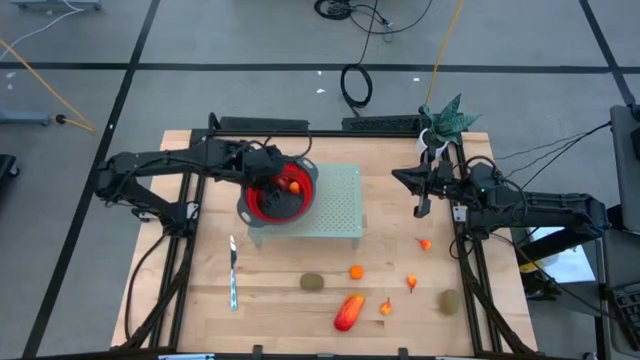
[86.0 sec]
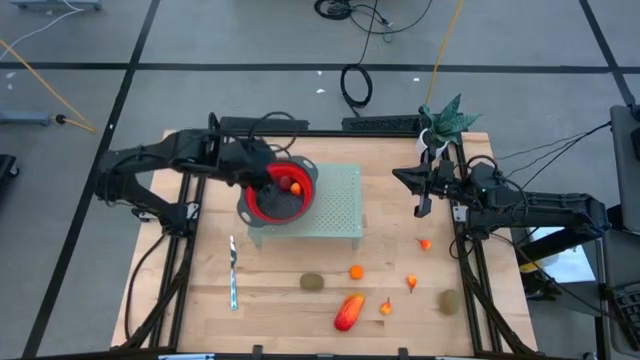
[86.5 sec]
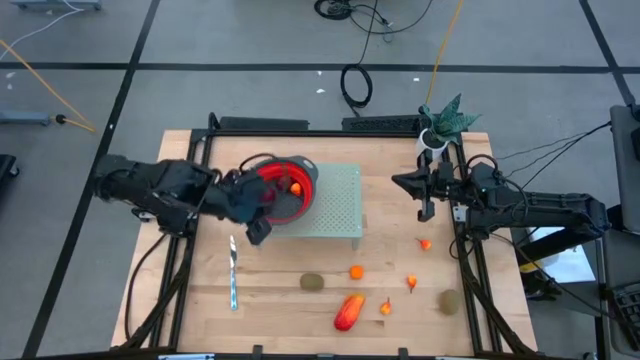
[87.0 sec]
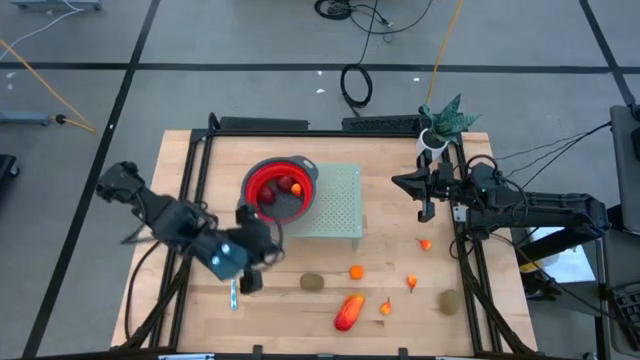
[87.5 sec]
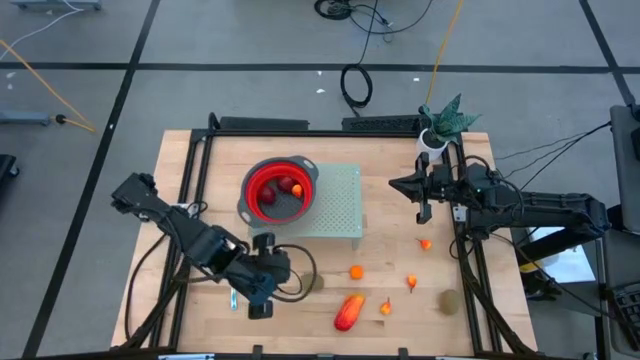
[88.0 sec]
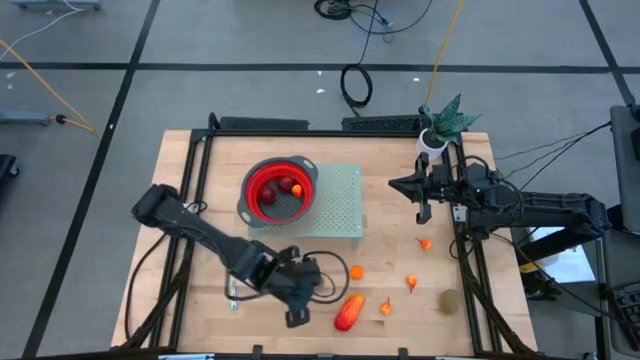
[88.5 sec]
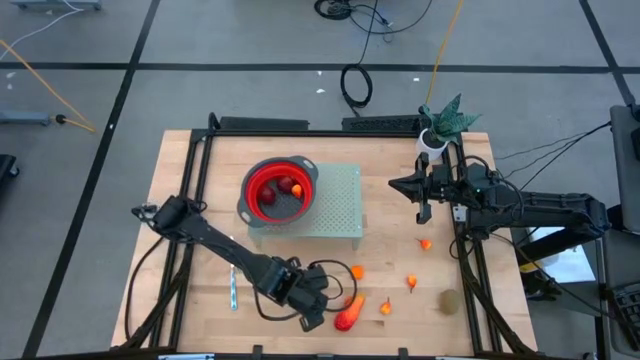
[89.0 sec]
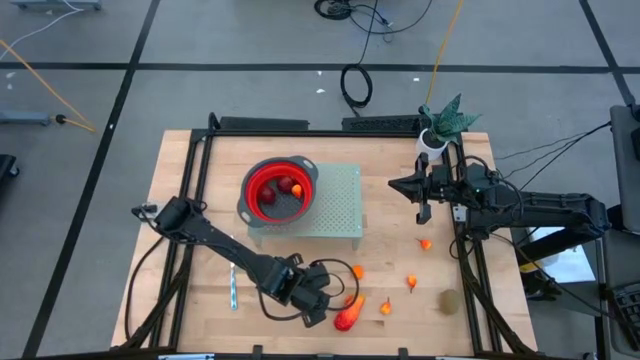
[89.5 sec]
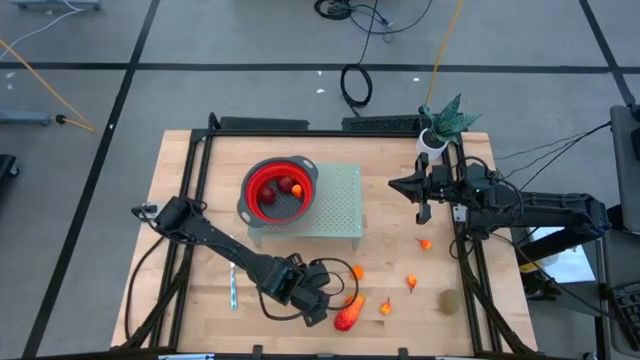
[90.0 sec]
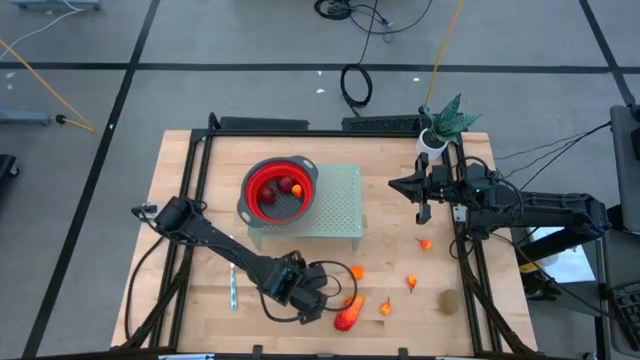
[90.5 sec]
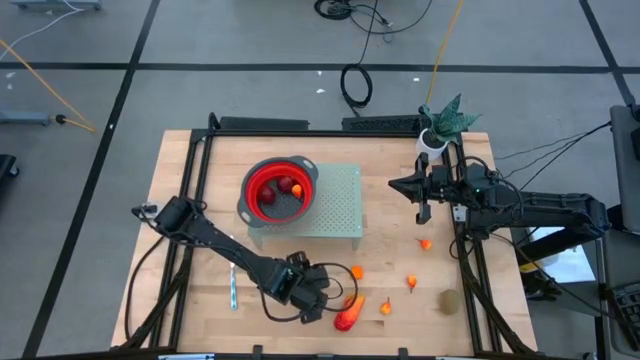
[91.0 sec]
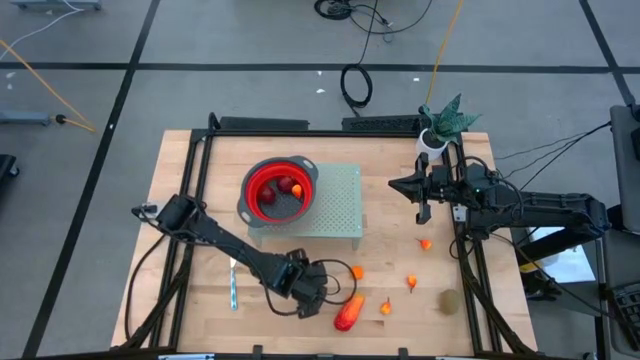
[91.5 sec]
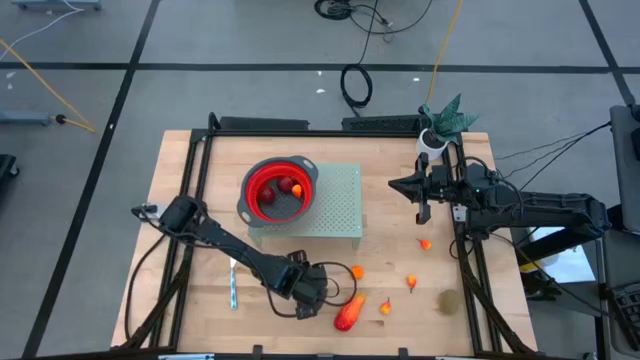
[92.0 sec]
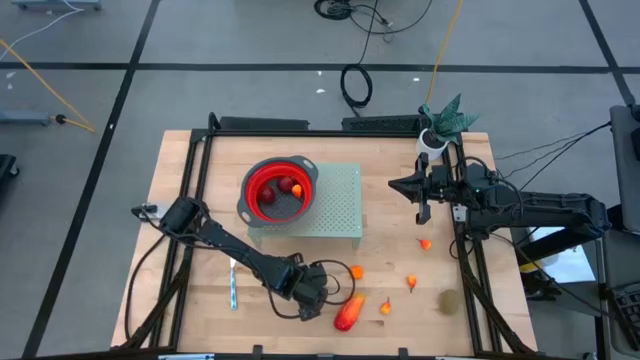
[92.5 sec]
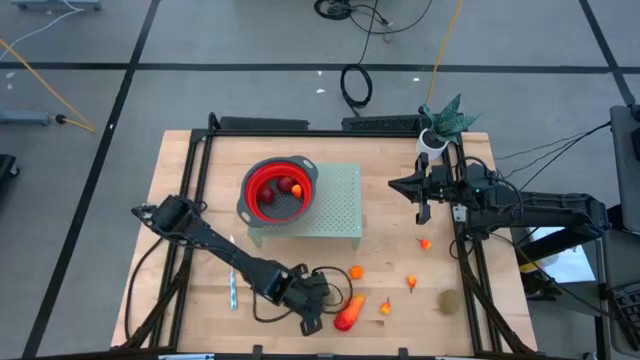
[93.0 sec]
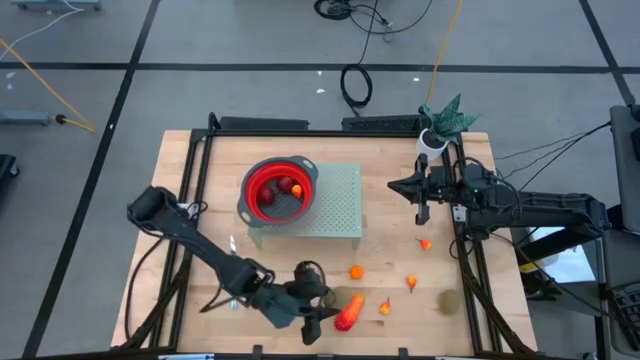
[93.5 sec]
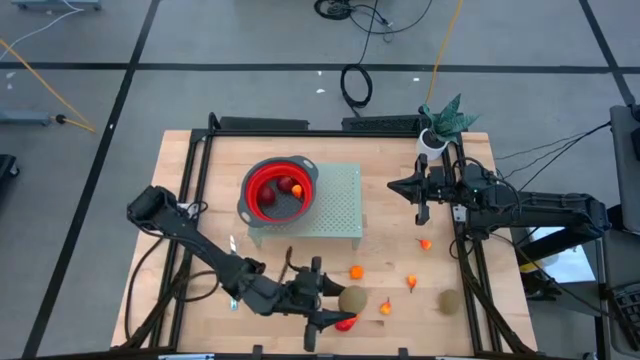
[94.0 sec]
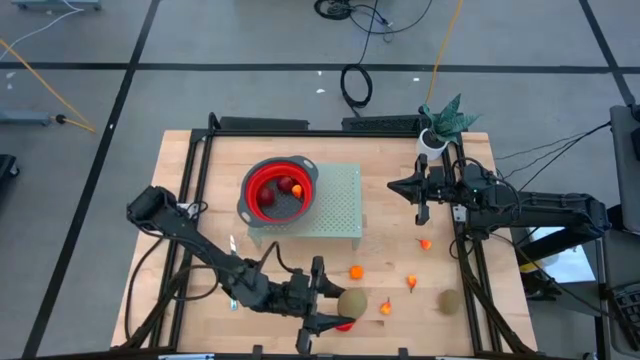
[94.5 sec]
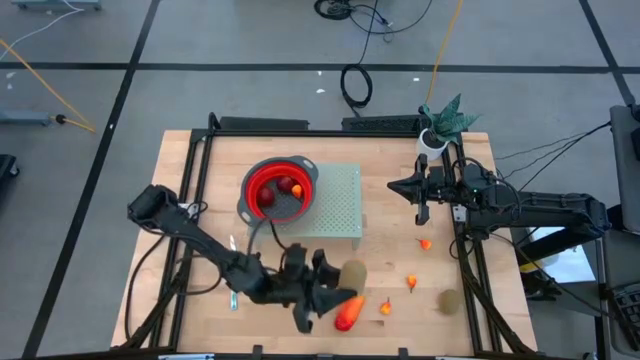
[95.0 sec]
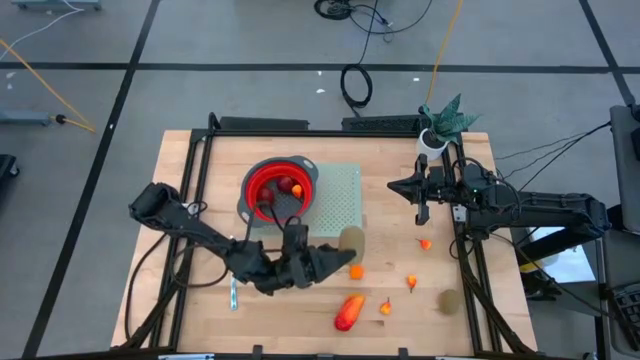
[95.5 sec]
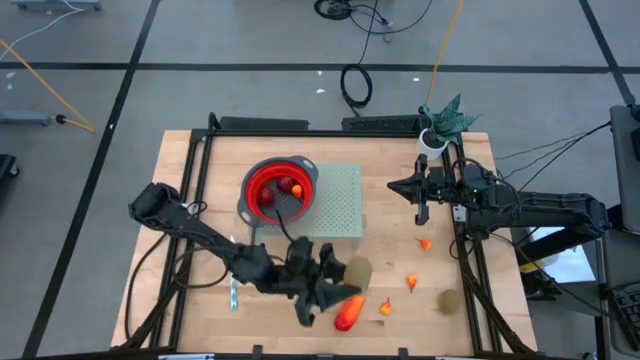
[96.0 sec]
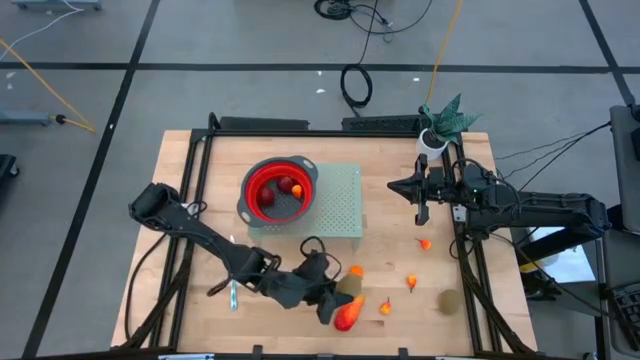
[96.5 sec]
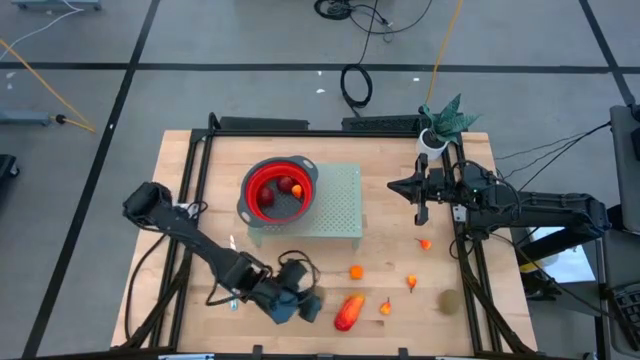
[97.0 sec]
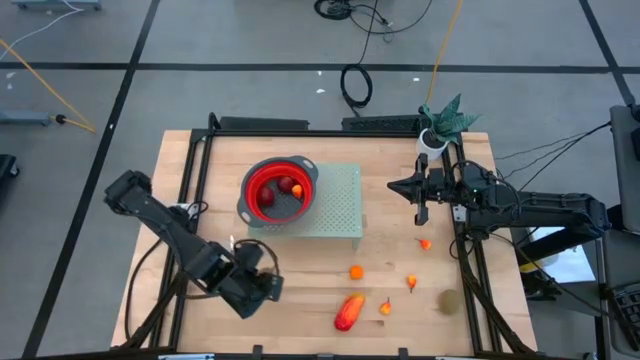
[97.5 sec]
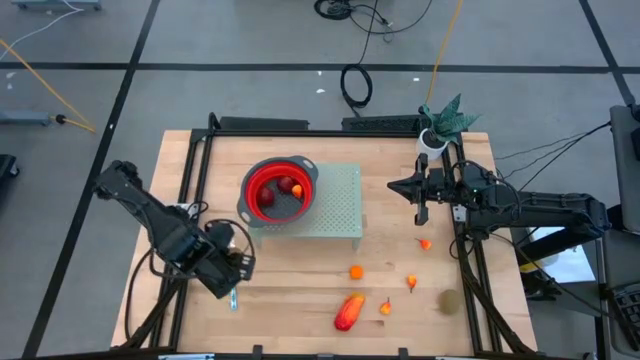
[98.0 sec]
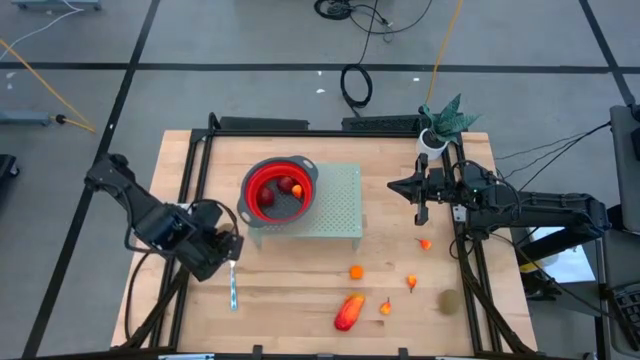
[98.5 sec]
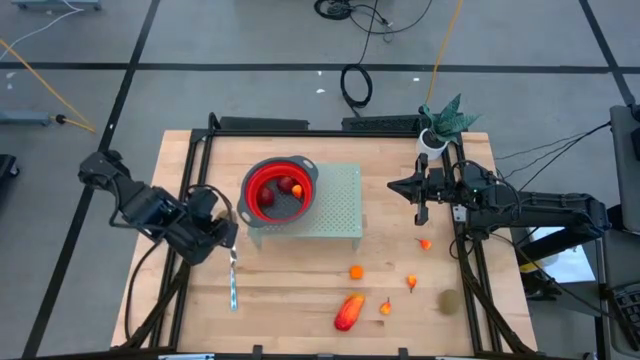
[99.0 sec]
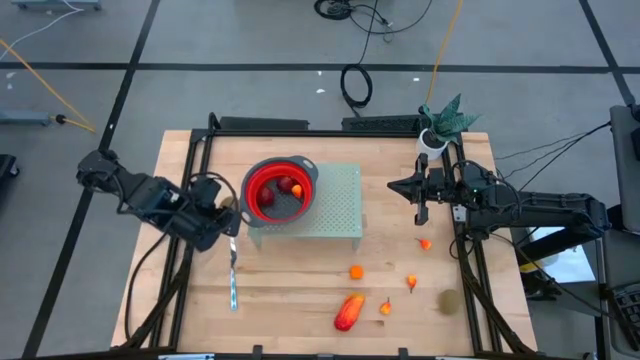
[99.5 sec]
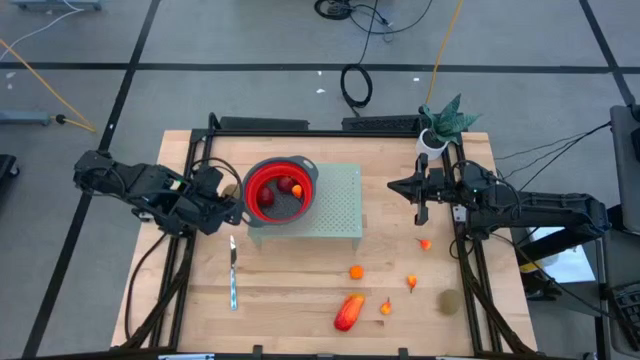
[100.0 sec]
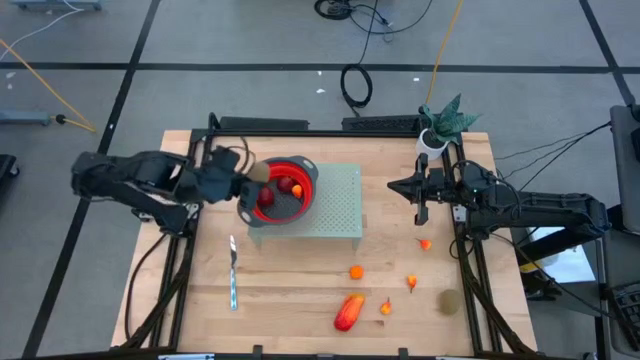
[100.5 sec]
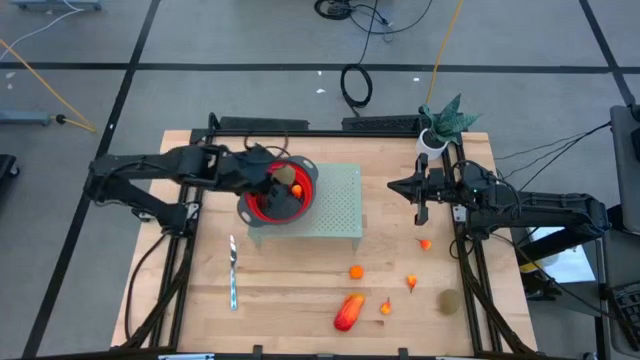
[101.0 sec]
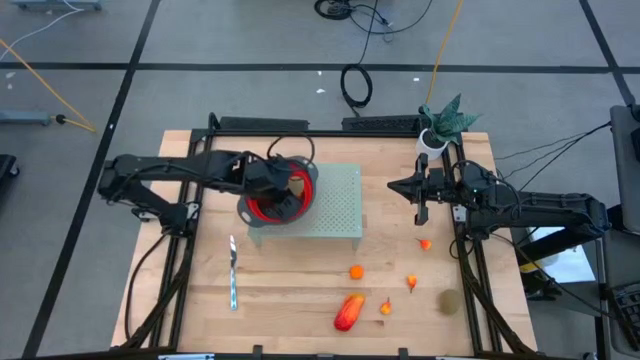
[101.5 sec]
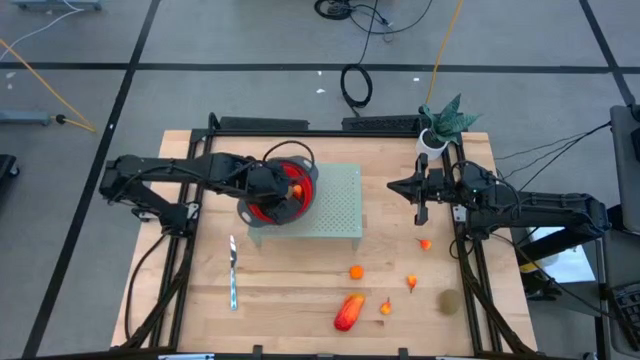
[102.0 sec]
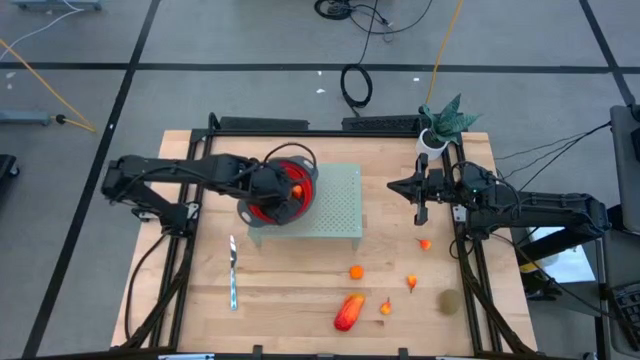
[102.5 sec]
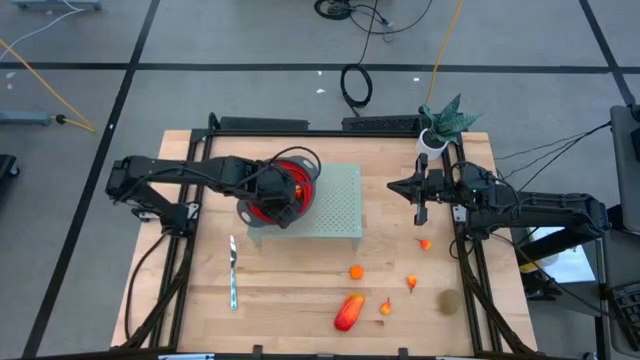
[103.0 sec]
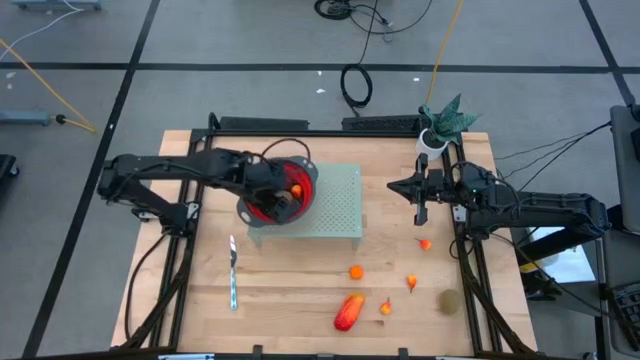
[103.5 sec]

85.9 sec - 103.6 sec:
Task: Pick & Place Fruit
Put the left kiwi into the strainer bowl on the shelf

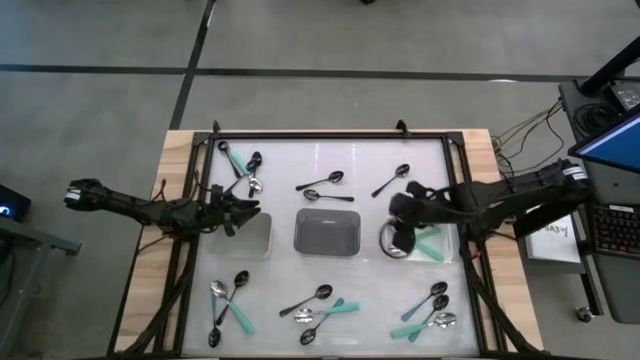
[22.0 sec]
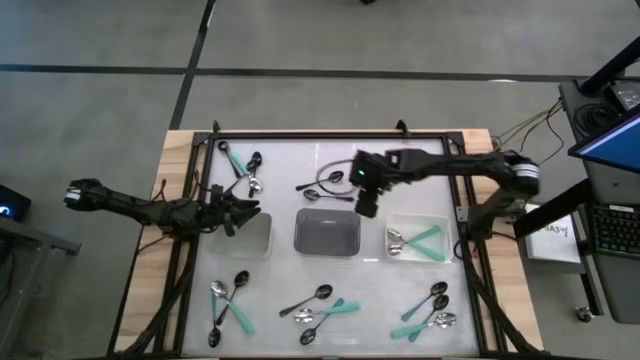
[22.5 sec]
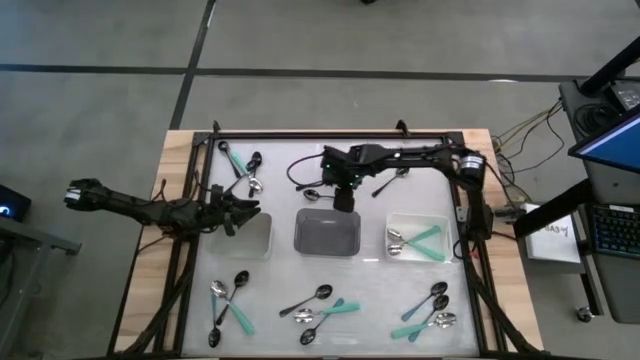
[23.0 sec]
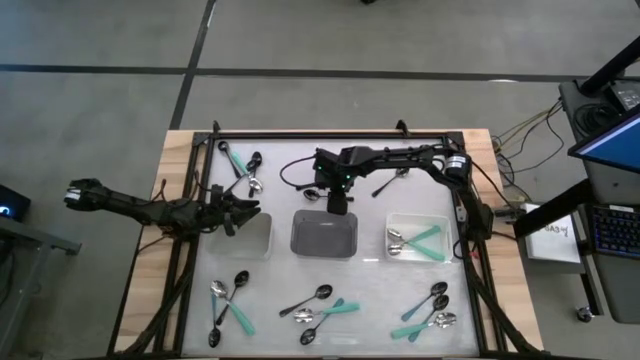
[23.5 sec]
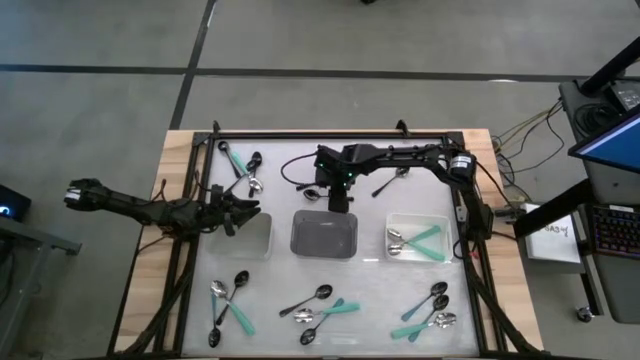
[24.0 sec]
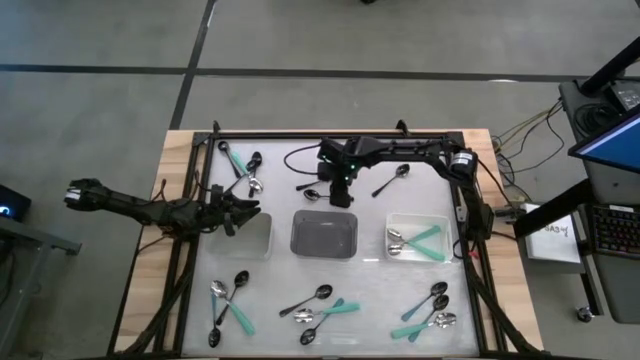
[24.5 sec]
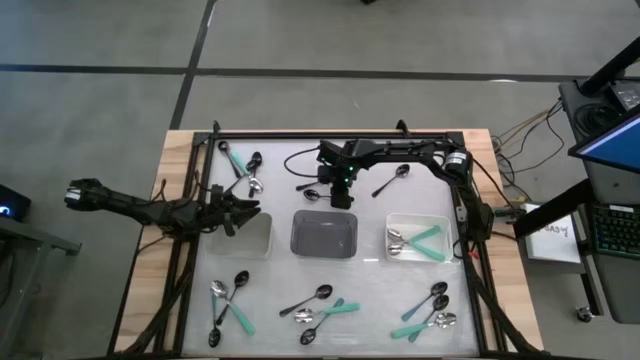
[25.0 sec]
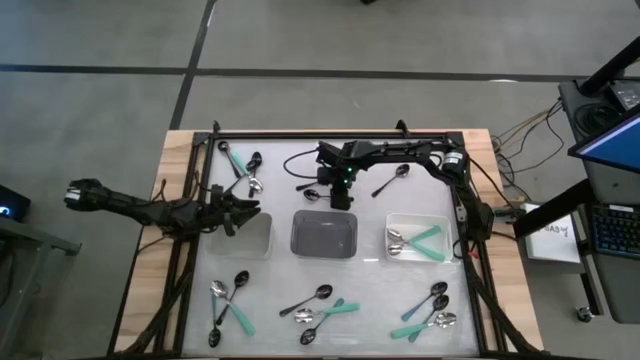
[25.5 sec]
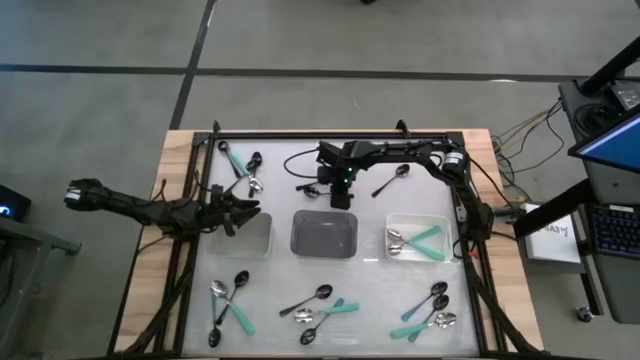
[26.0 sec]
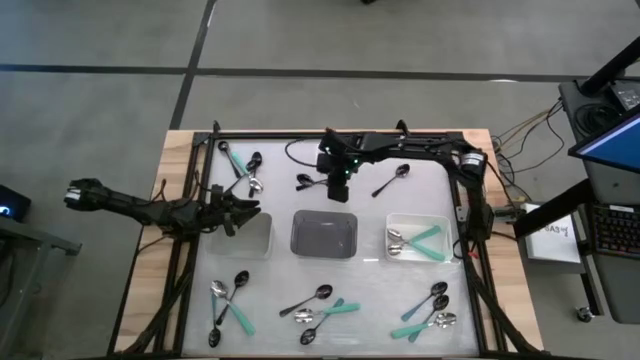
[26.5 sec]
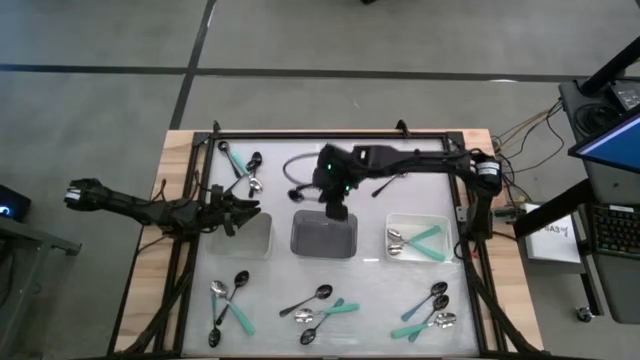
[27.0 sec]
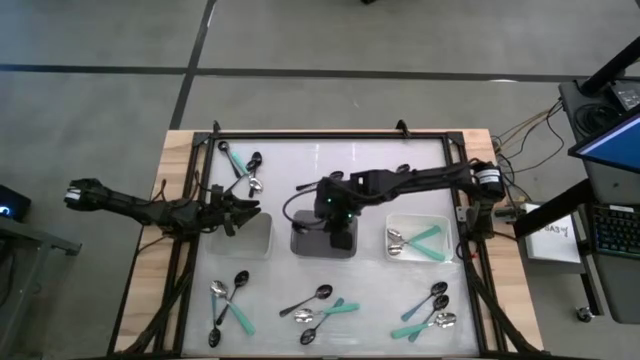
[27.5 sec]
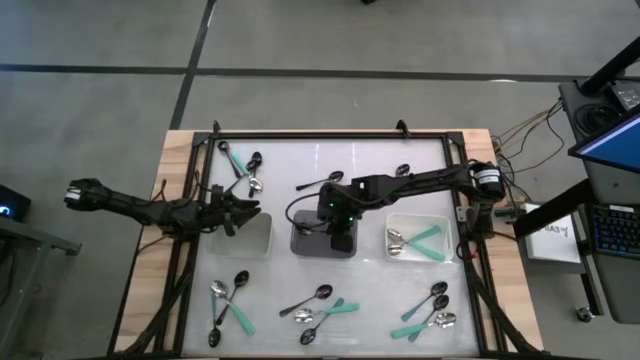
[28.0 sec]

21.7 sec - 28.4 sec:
Task: Sort silverware by color (type)
Put the black spoon into the black bin
